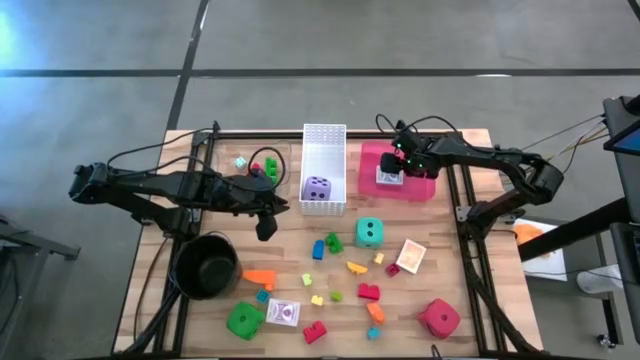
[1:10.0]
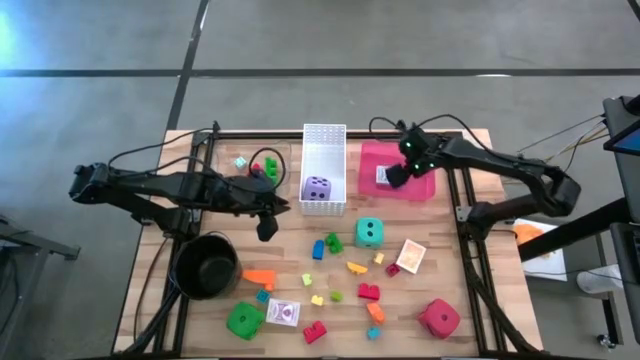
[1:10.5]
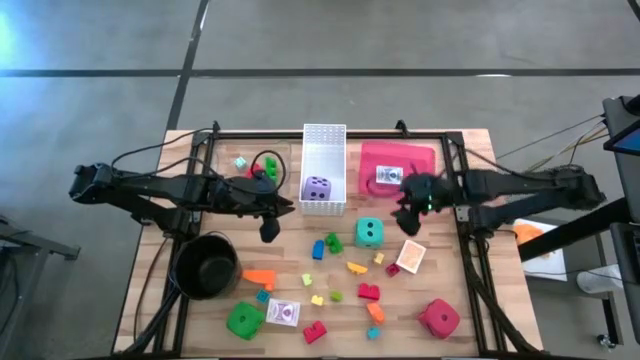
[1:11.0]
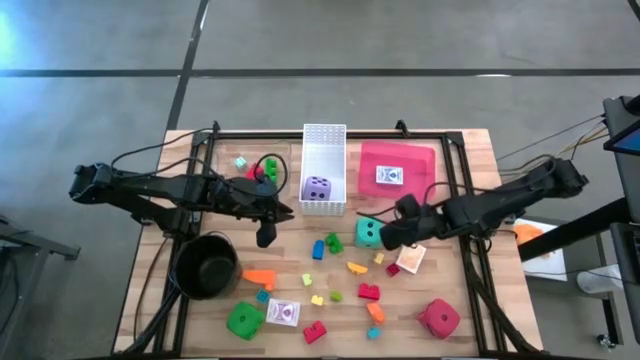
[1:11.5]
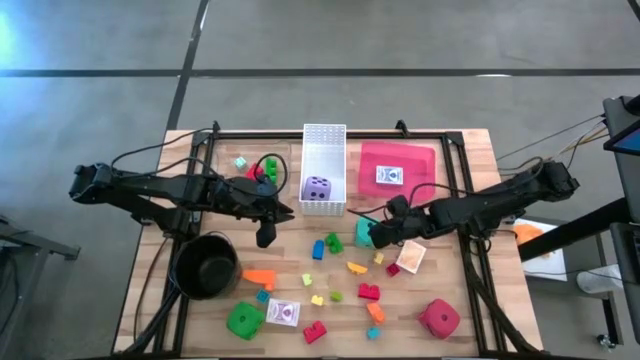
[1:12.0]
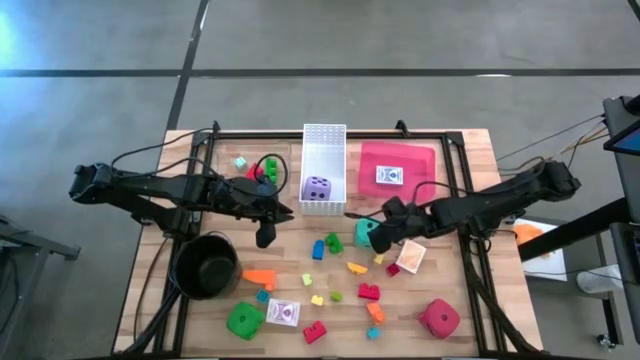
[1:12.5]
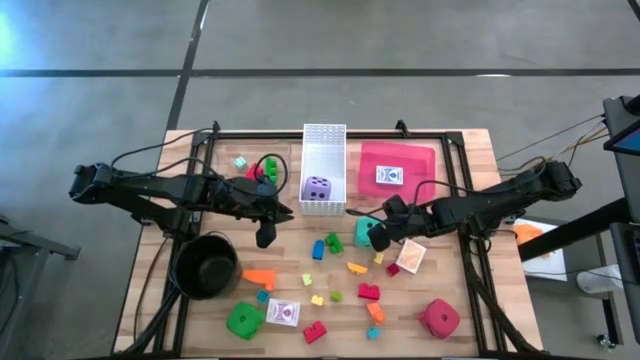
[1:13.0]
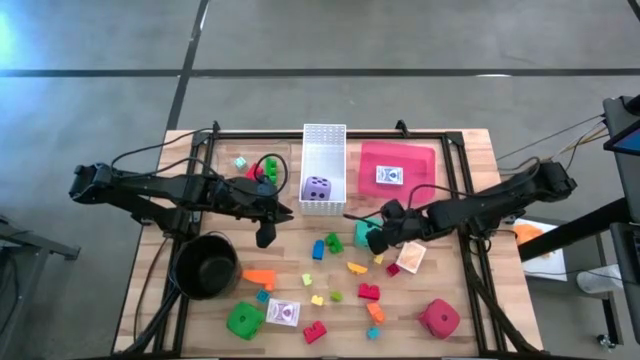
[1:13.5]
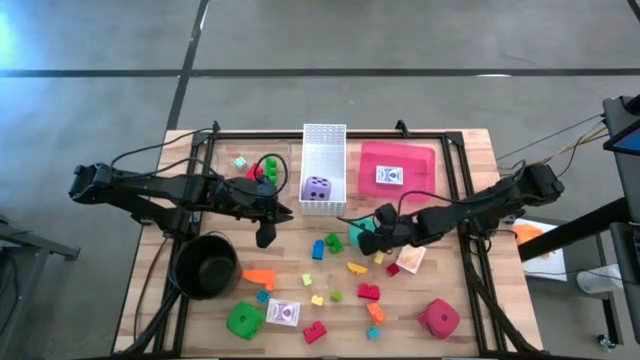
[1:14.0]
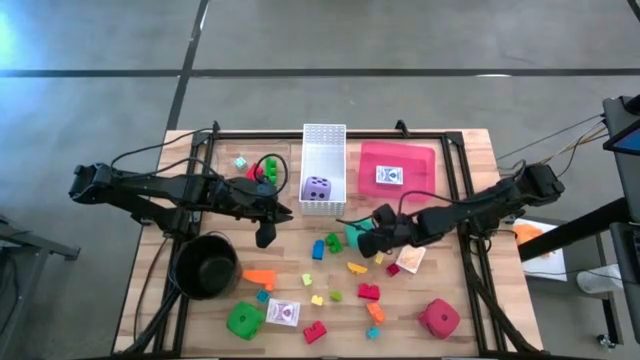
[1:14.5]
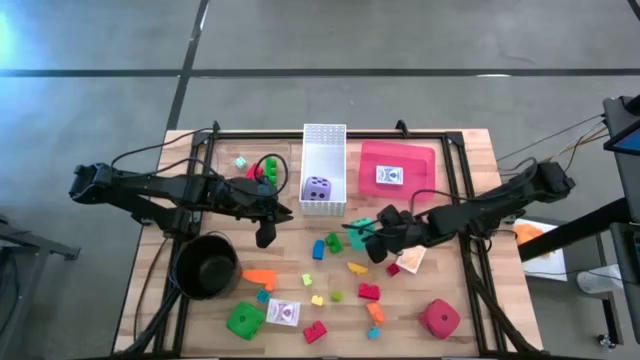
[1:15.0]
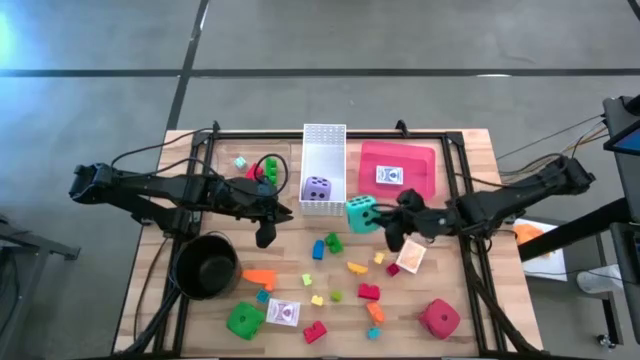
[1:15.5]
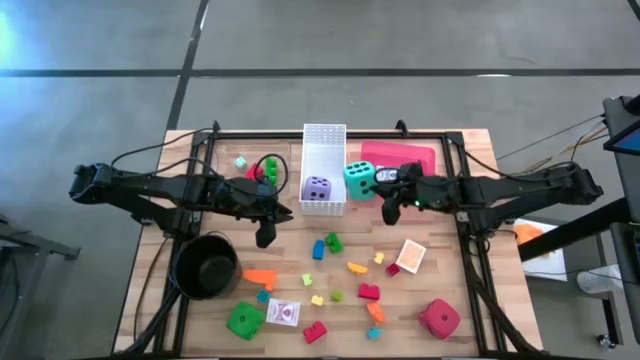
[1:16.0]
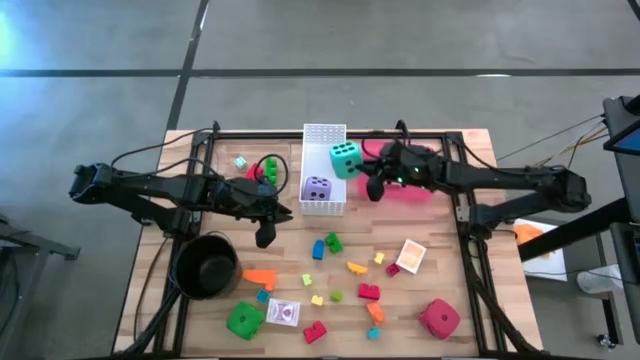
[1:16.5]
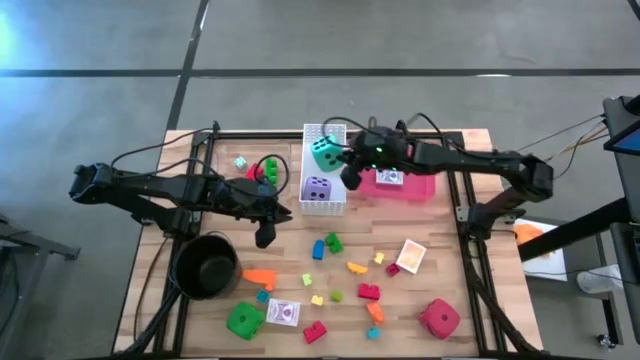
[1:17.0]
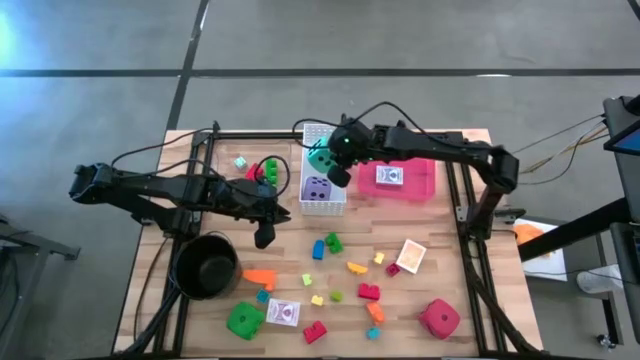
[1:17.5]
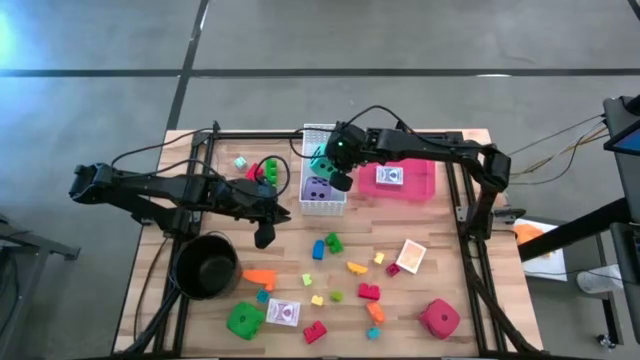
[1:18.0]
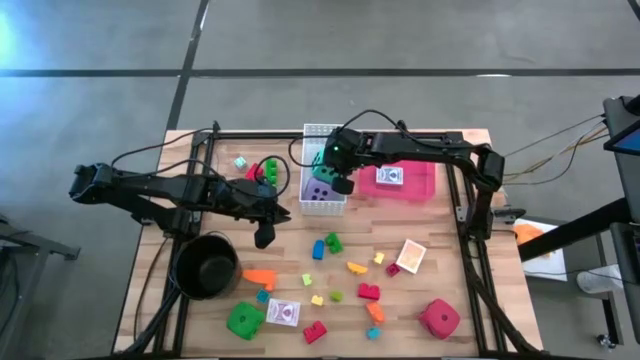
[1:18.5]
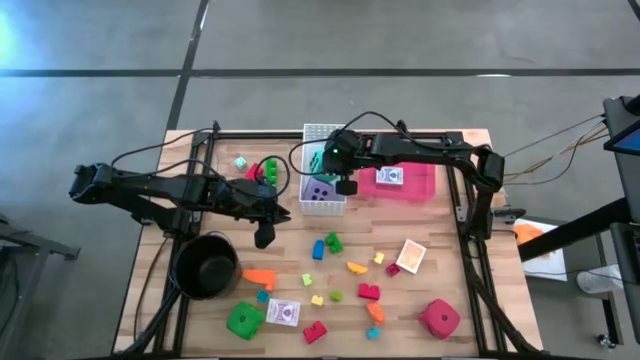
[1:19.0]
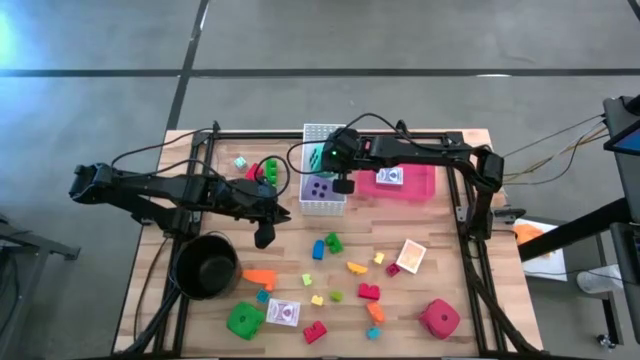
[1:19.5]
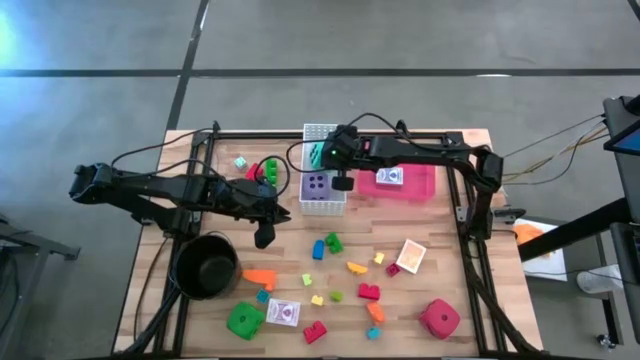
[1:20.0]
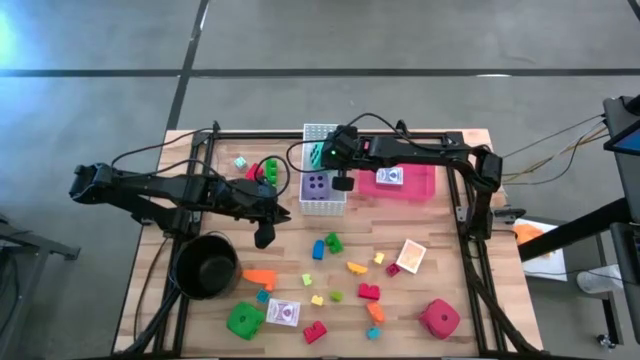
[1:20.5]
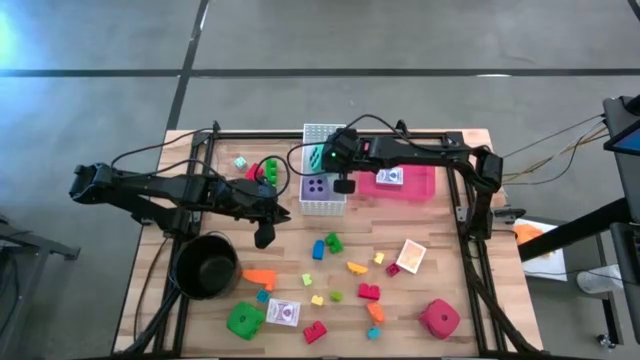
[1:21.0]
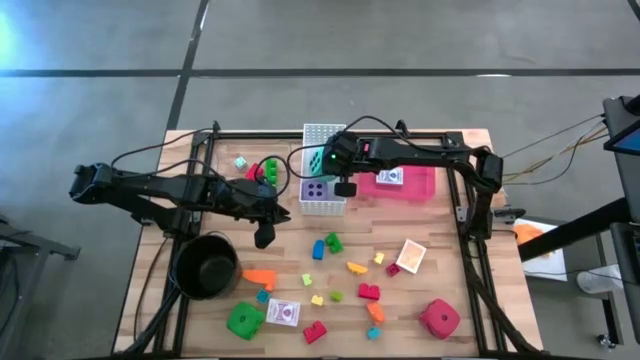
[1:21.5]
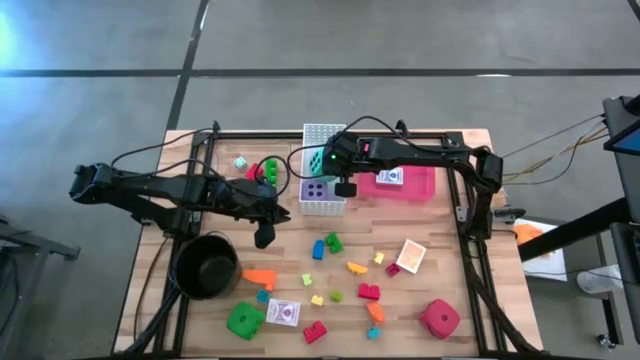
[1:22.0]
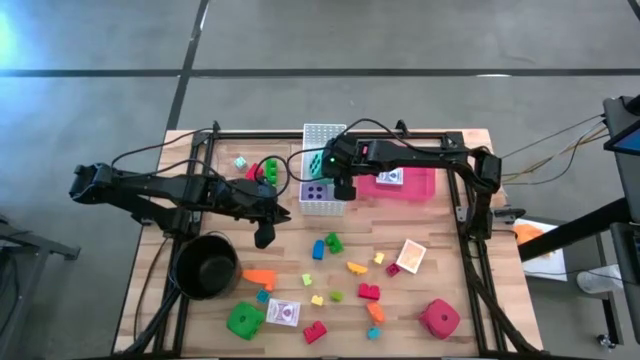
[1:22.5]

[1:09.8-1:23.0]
Task: Pick & Place Toys
Put the blue dice into the white bin
